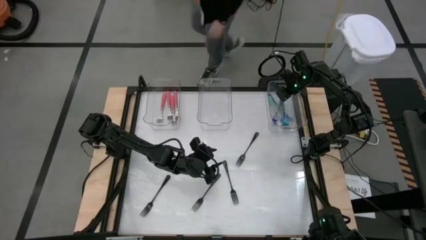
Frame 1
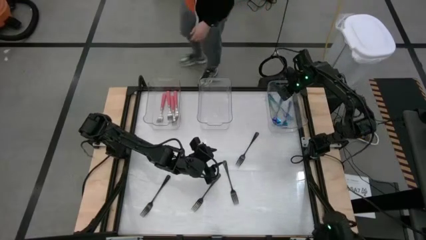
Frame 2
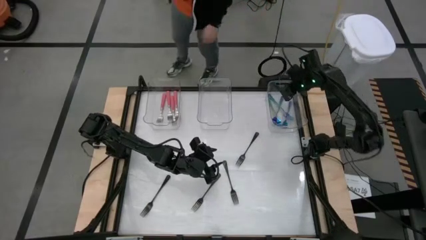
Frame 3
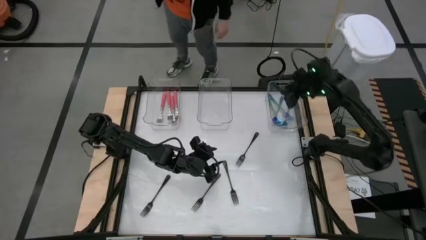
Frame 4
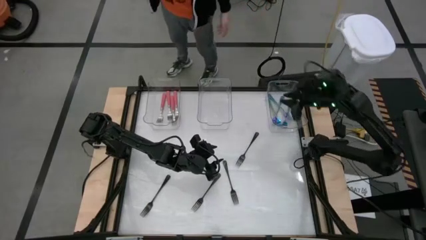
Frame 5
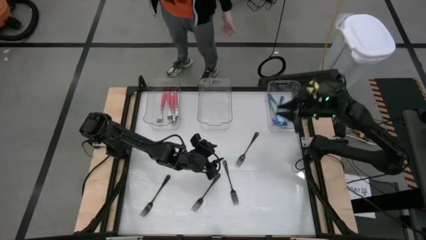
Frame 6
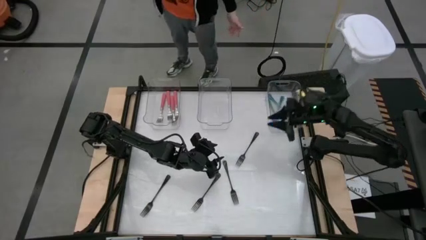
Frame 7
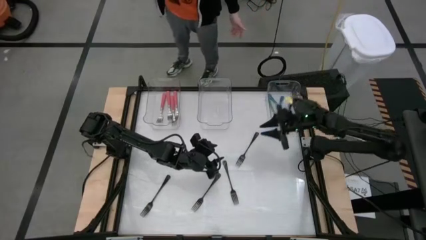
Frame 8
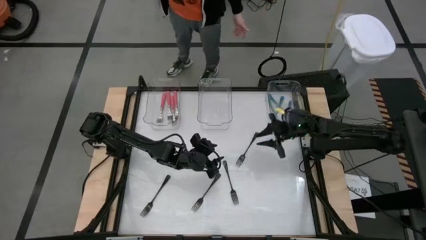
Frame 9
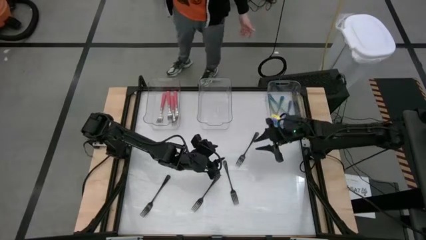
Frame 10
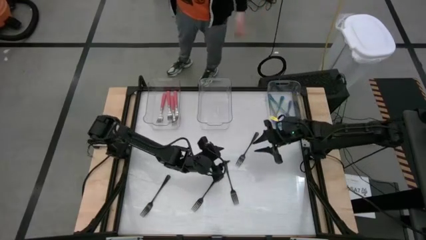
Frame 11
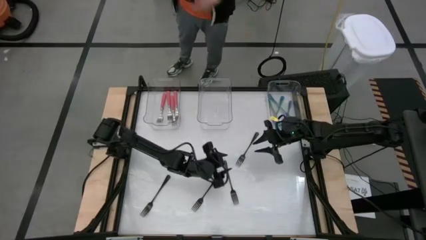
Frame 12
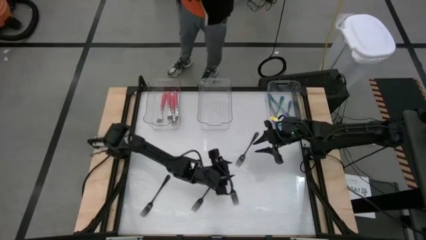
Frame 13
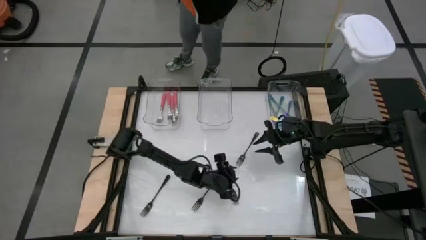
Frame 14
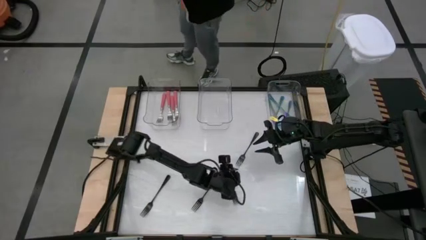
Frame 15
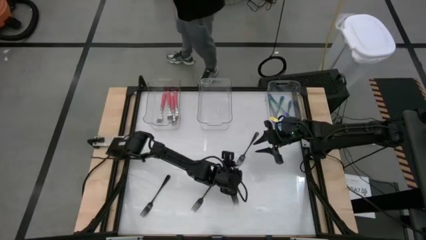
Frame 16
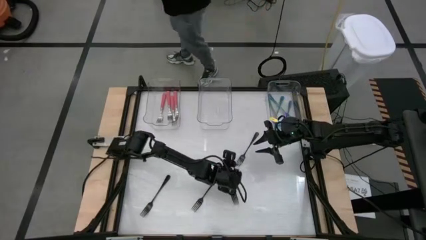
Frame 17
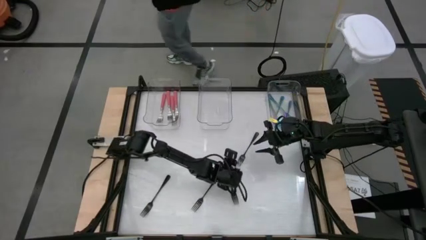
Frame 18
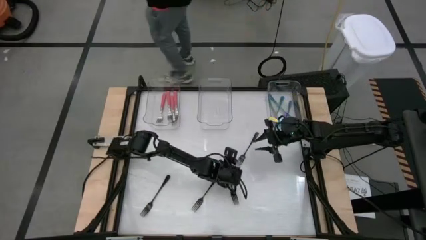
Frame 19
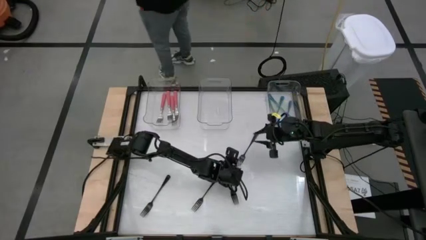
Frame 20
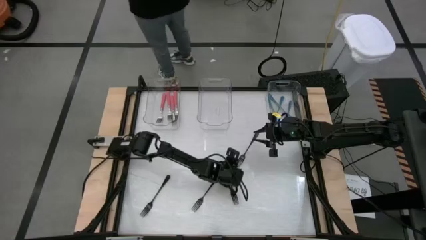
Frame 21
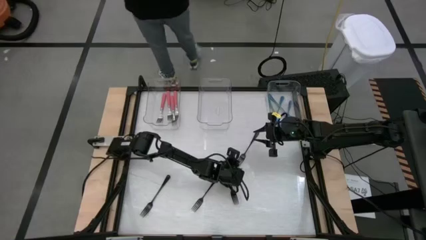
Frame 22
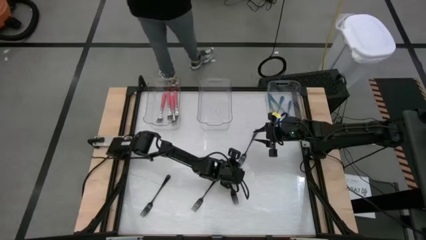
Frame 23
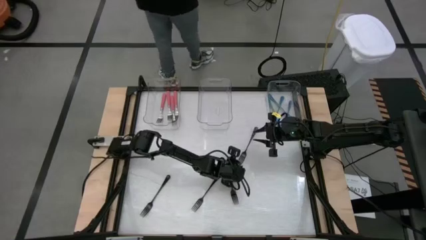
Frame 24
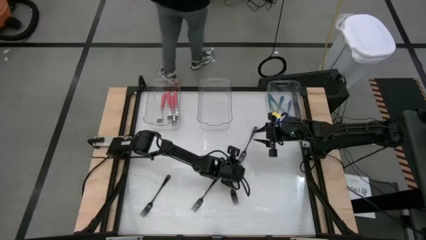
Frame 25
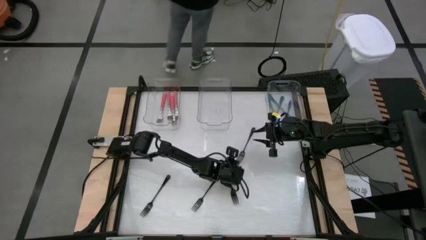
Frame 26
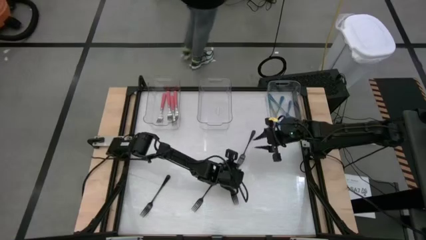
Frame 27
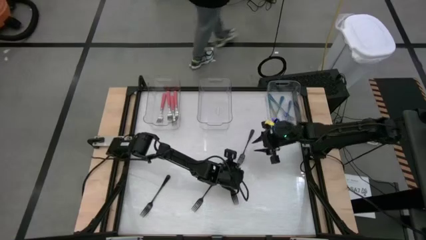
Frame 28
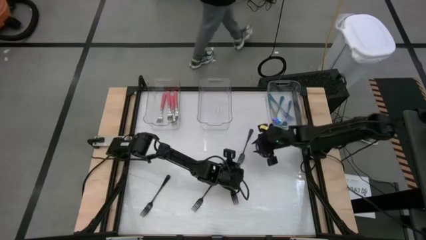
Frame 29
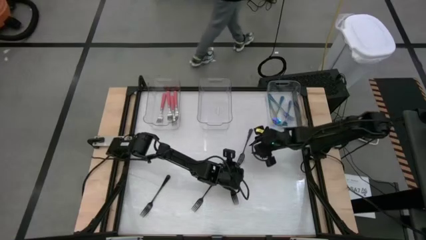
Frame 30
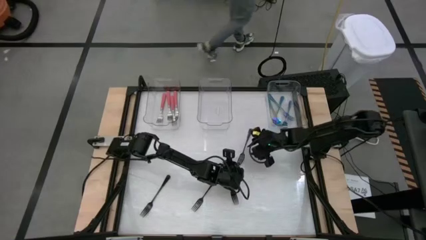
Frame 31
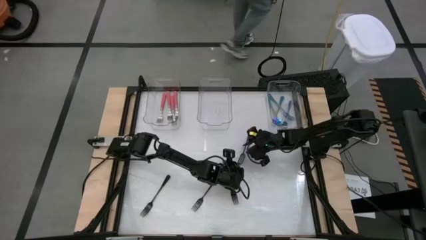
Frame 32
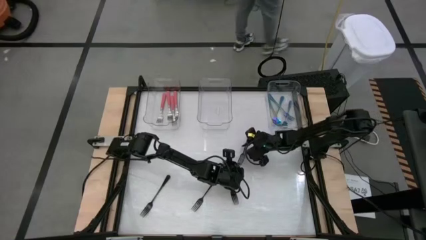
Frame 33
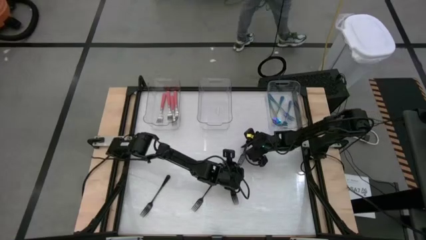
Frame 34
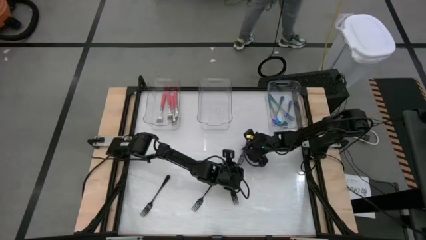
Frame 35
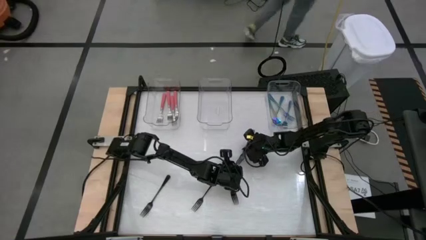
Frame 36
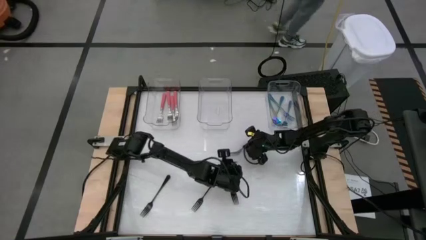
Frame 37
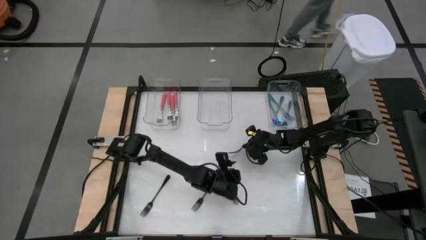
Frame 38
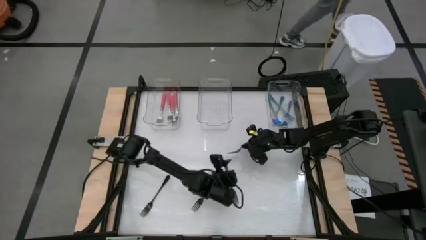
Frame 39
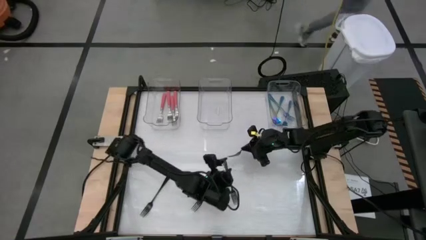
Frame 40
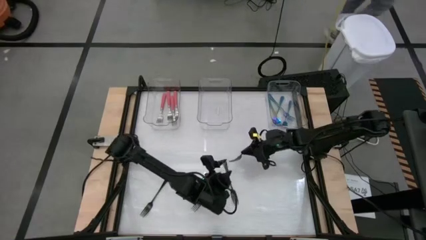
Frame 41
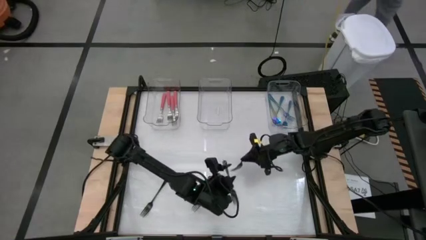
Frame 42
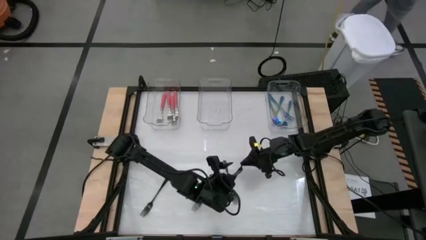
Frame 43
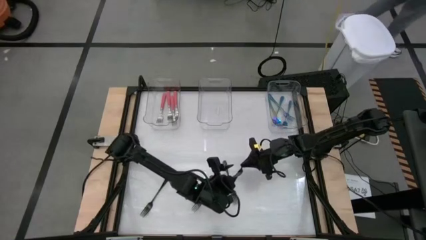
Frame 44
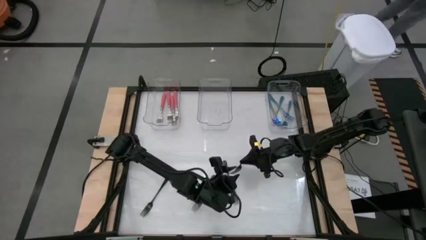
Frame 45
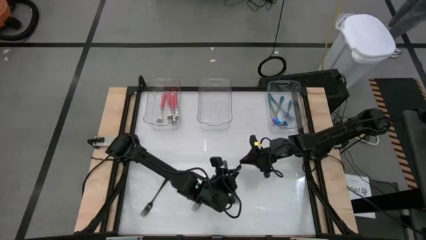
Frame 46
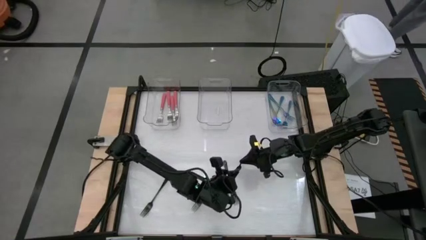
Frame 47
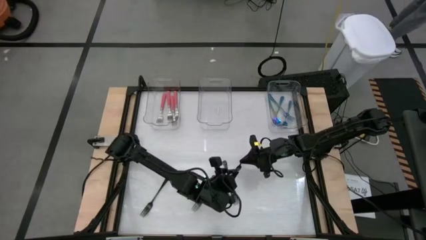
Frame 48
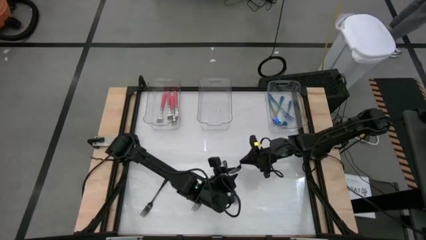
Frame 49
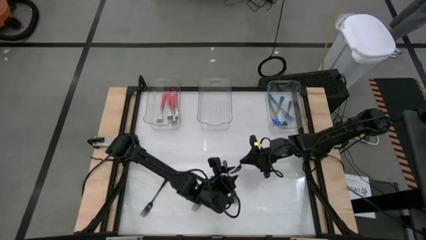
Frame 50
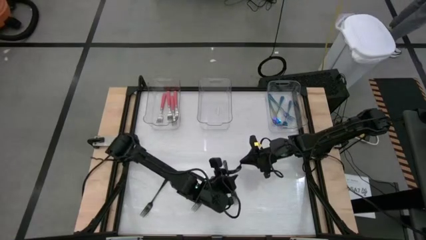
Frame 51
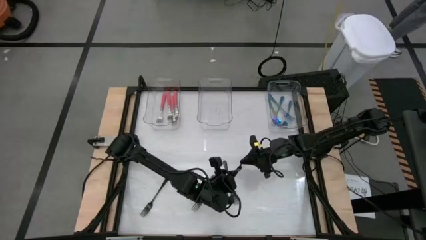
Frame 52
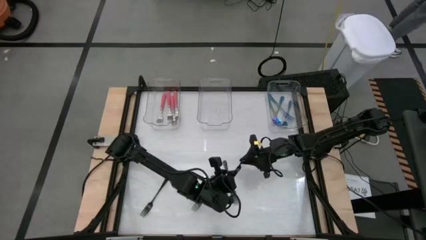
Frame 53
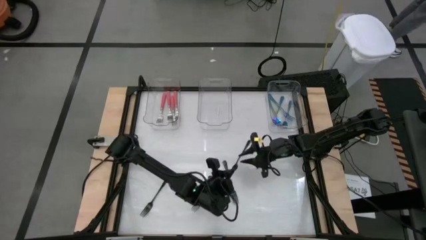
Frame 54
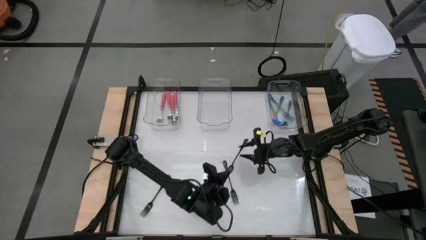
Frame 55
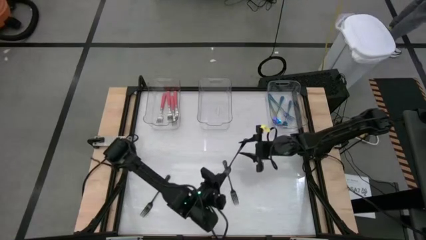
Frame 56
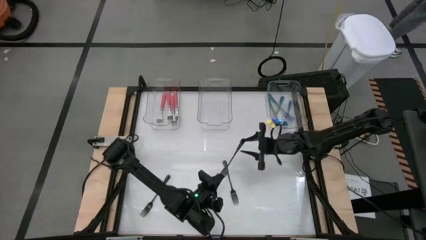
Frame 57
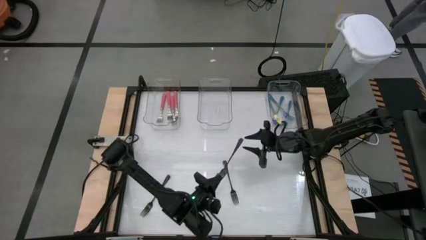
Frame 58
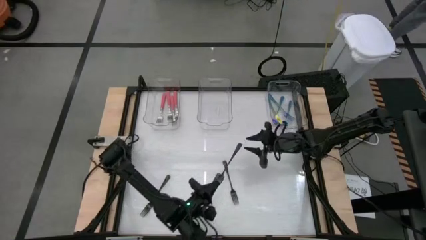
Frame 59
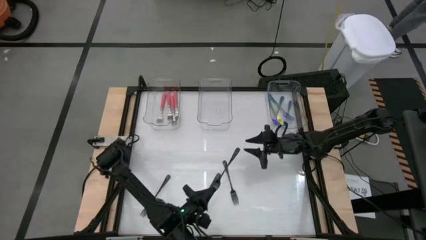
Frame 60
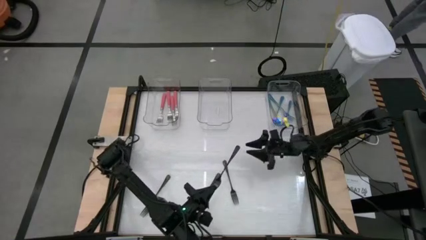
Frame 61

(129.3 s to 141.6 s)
Task: Sort silverware by color (type)
Put the black fork into the middle transparent bin
